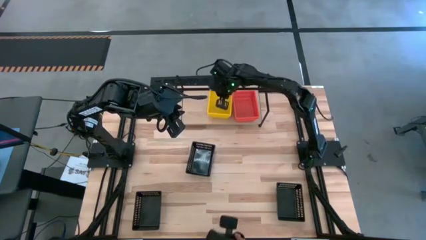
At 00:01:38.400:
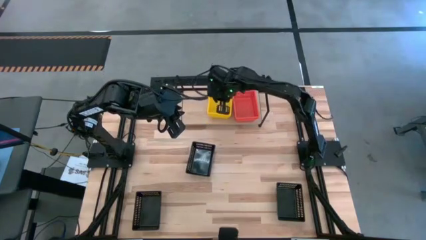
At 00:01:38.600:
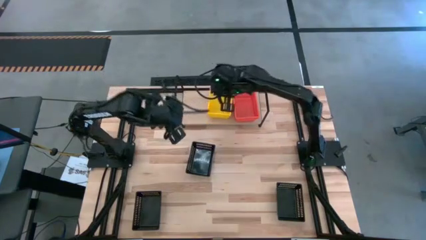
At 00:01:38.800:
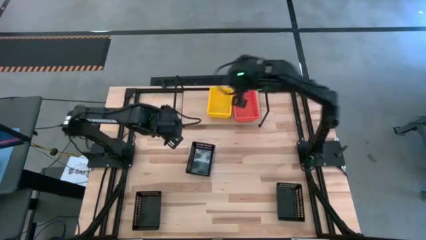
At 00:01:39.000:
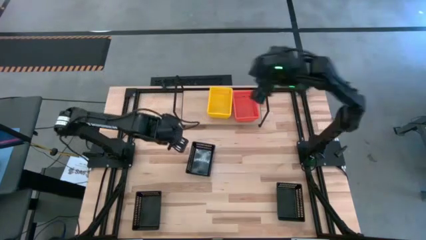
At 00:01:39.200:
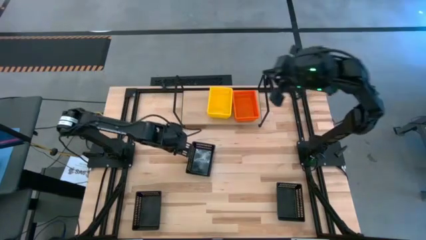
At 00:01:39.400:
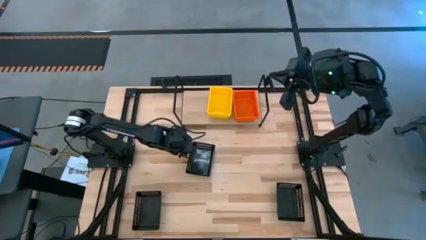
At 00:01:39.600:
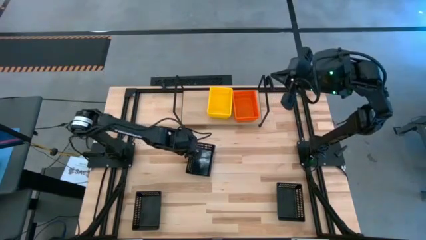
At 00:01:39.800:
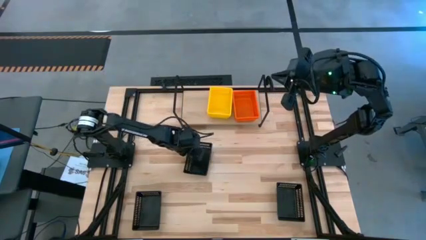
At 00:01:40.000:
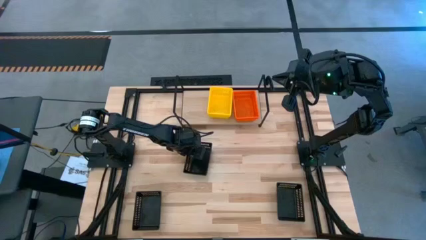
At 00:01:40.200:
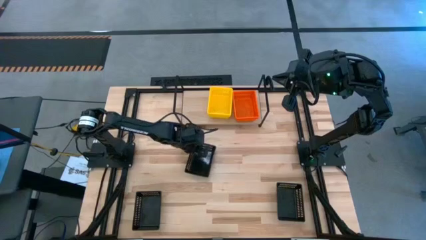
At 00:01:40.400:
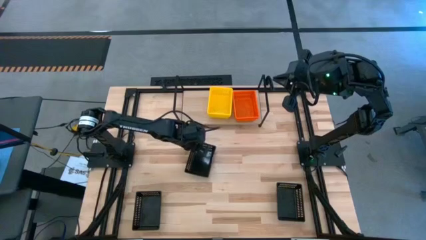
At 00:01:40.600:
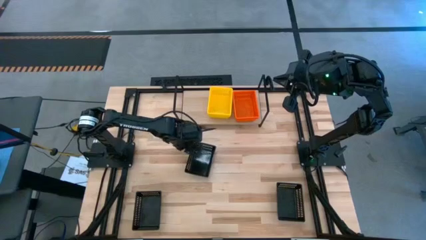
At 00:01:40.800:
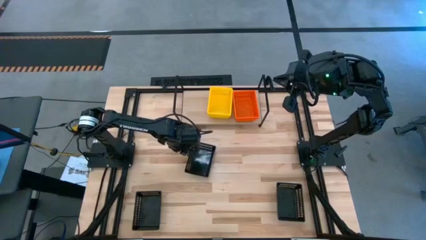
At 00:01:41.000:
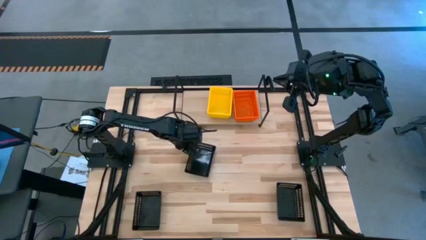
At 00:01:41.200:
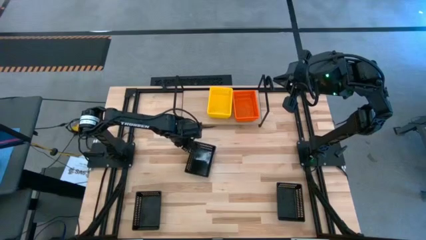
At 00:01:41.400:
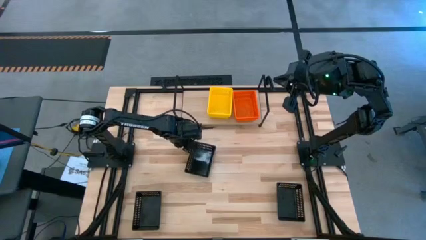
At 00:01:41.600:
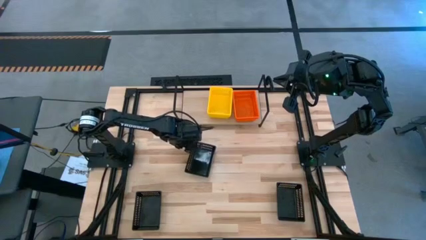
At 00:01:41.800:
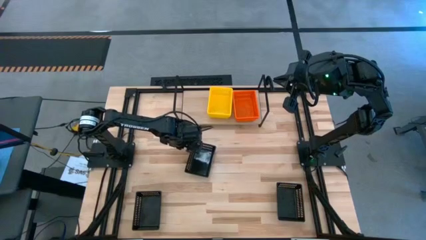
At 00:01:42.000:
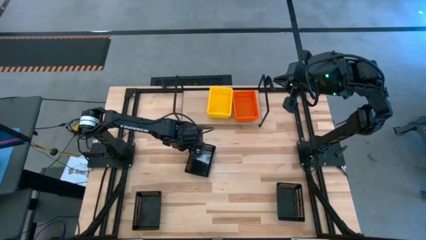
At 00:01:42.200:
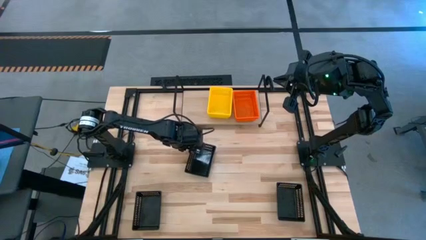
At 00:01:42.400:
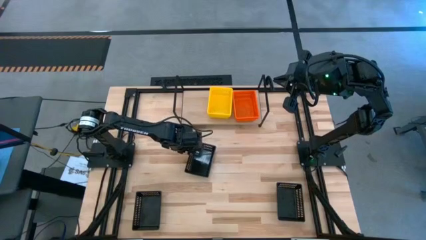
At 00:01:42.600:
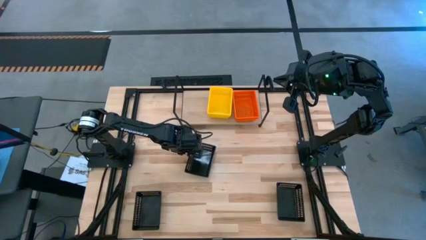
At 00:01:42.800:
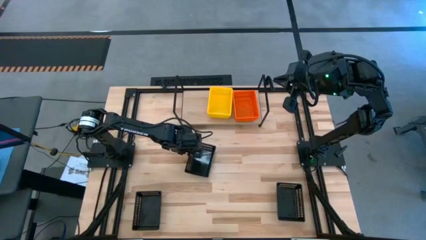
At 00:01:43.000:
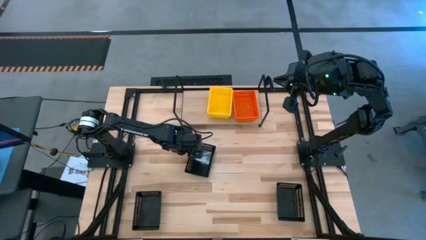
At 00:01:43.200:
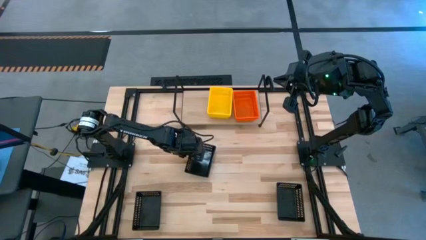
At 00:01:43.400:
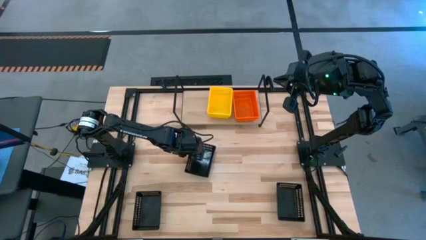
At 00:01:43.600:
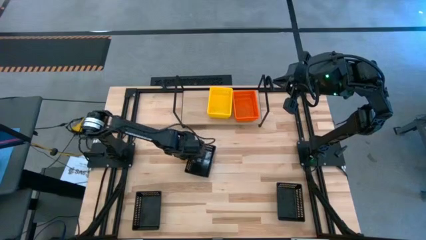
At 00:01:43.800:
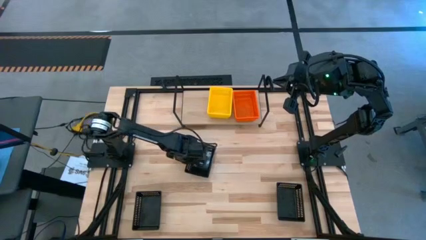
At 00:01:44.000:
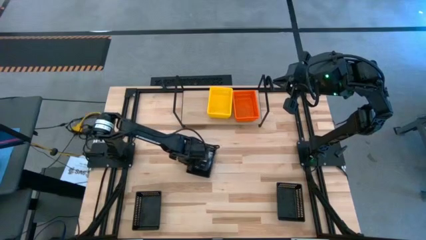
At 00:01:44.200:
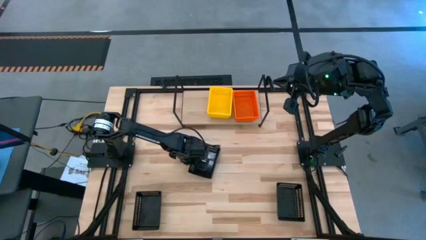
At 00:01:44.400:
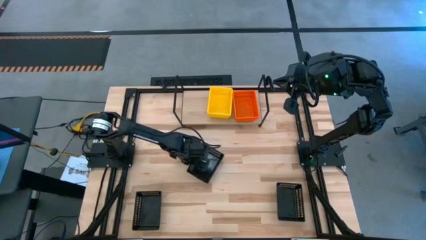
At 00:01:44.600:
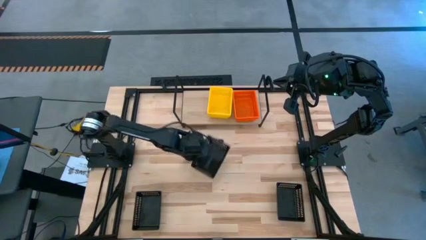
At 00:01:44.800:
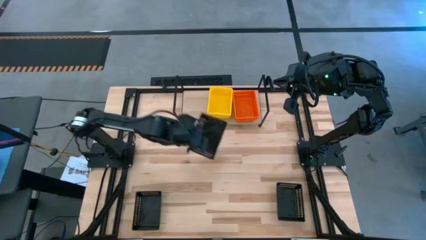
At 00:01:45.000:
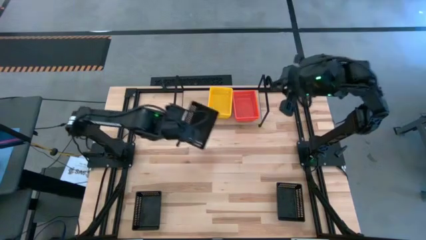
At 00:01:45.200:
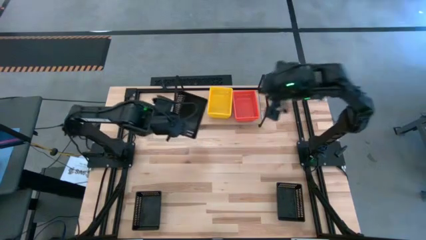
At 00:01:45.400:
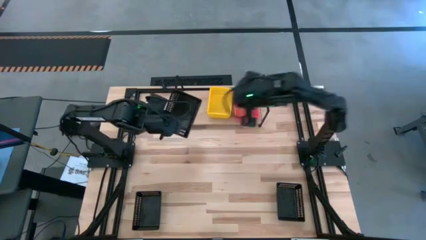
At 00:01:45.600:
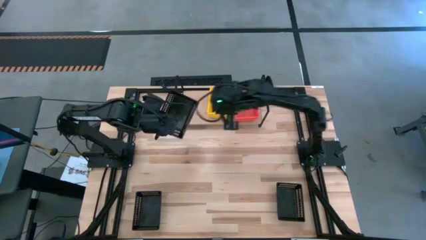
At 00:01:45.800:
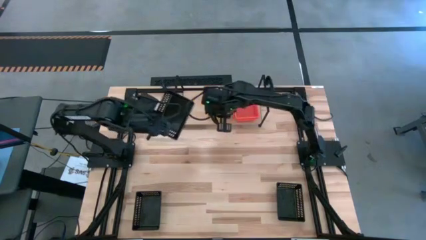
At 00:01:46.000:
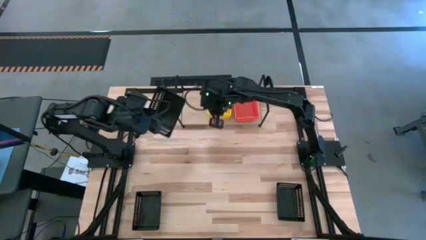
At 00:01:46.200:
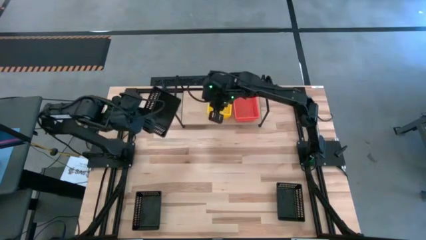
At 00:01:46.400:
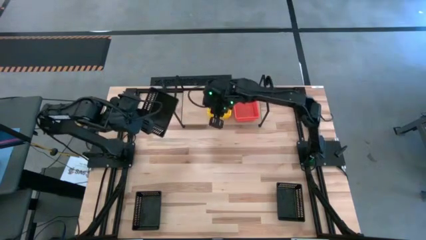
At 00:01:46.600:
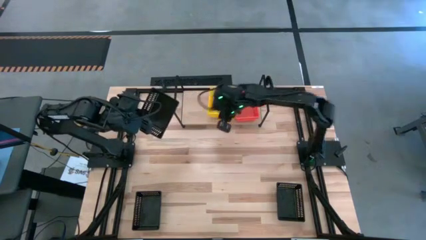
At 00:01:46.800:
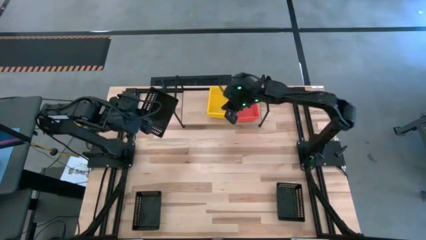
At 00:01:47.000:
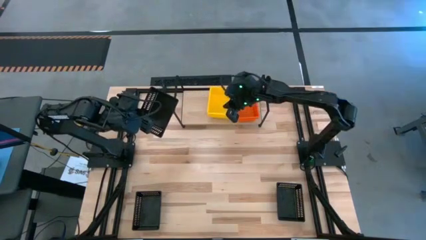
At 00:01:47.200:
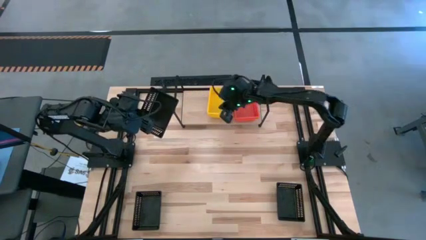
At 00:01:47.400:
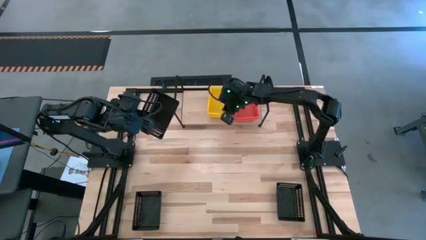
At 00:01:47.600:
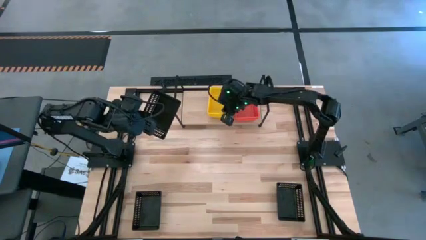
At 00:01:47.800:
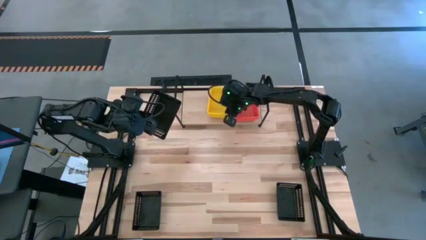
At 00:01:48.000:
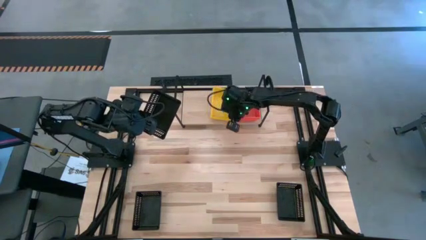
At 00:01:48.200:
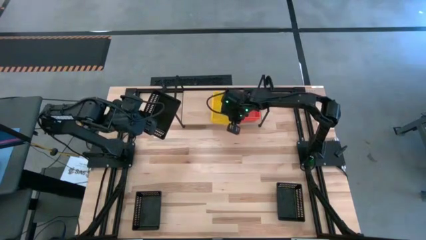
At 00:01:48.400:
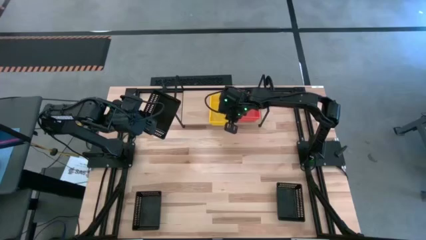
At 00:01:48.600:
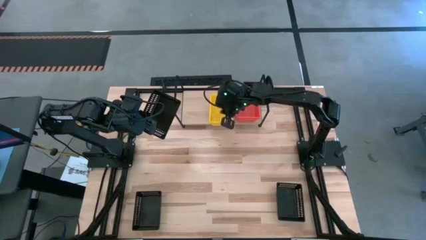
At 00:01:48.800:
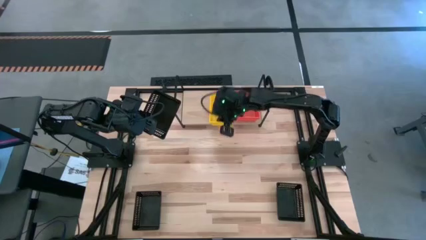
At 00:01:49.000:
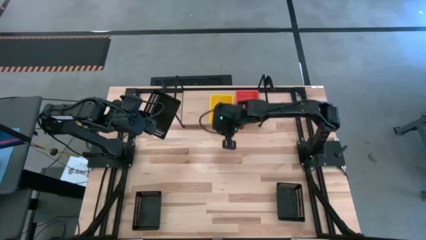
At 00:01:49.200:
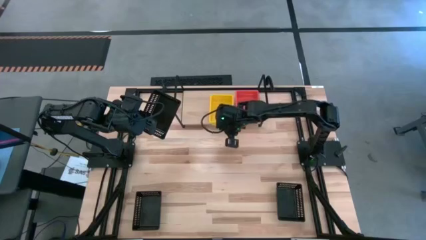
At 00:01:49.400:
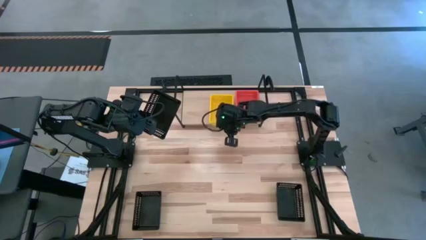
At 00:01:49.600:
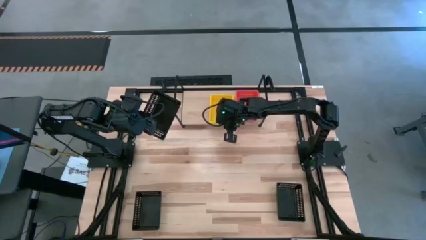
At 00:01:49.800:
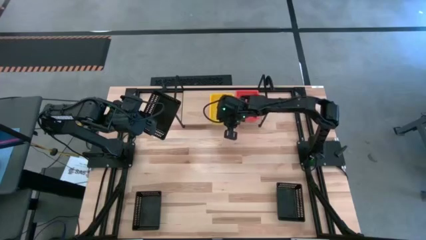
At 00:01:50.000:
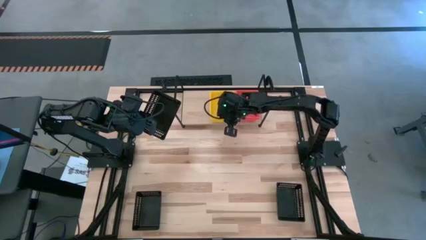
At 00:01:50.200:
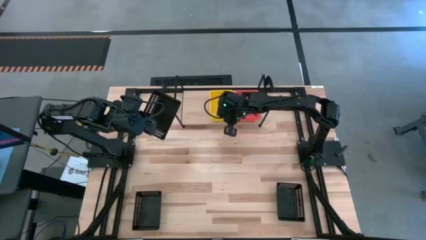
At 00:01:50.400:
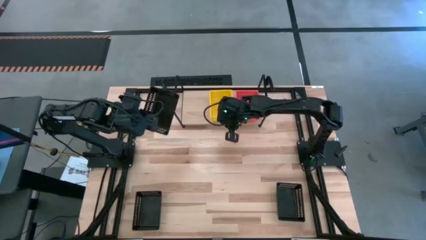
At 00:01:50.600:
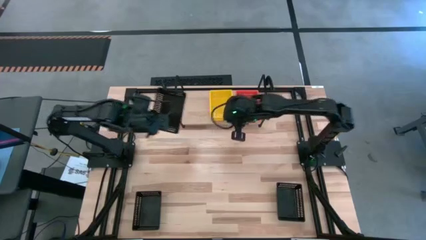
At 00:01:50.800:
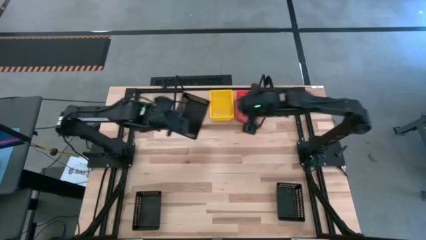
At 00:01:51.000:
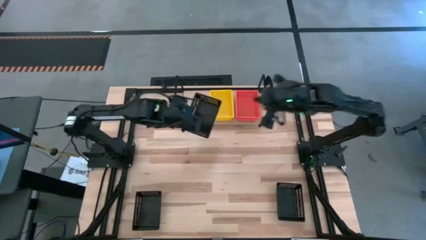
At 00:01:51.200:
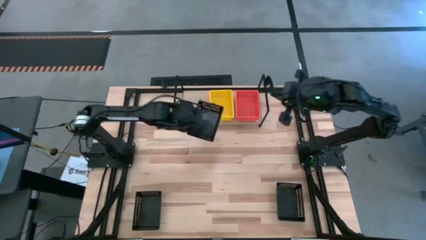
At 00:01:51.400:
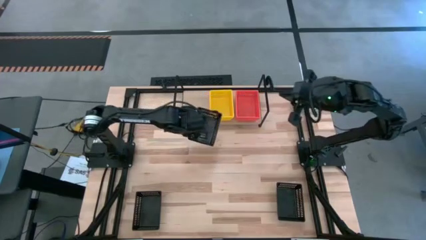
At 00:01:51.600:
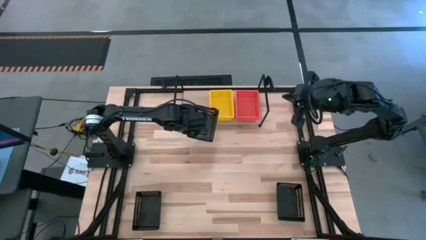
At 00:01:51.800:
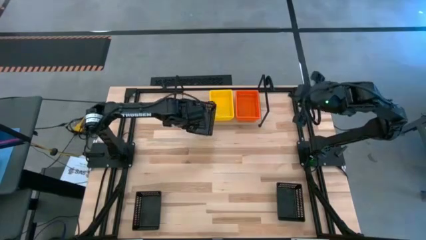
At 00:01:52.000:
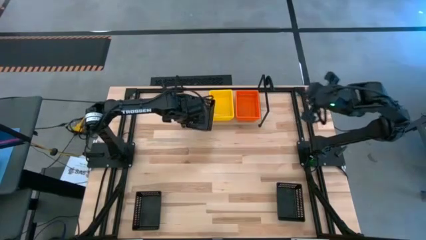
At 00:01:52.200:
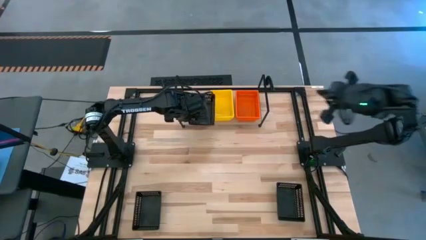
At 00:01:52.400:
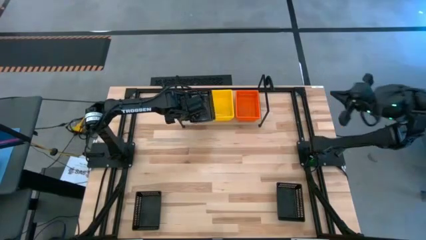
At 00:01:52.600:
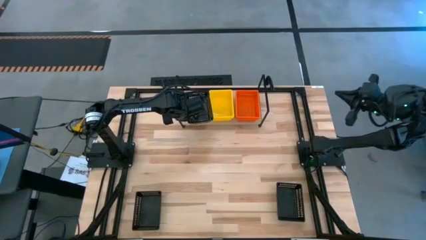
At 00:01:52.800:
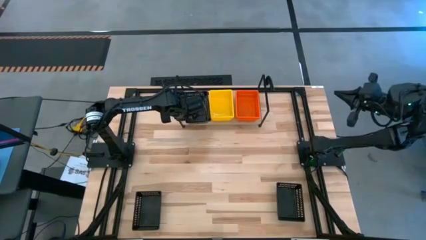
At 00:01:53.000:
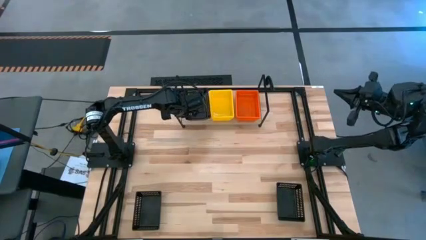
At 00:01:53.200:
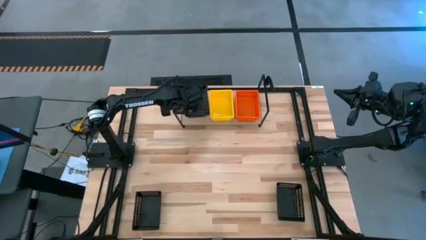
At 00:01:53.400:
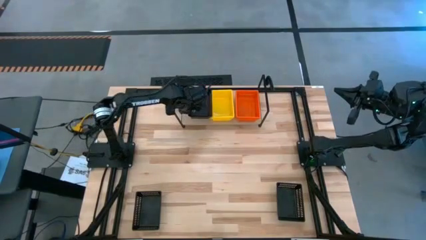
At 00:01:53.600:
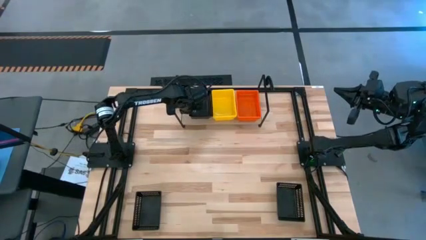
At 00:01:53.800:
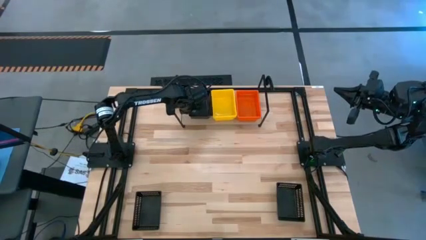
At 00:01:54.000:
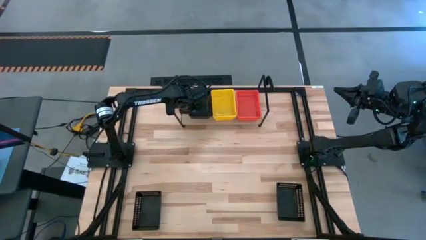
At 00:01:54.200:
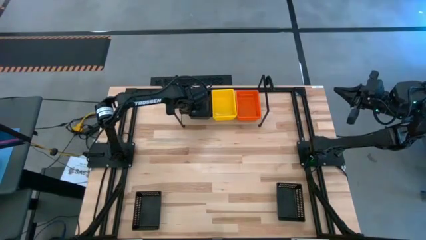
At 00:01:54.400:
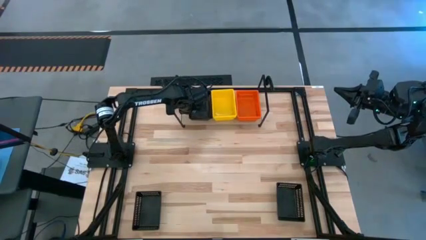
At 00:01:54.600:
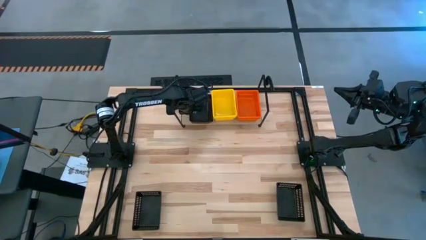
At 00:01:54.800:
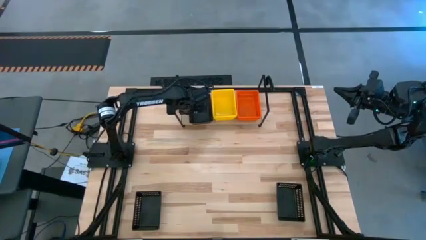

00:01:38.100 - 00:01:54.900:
Task: Stack baskets on shelf by color
Put the top black bin on the shelf
